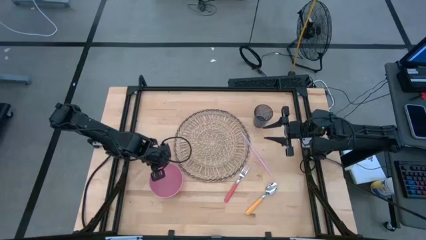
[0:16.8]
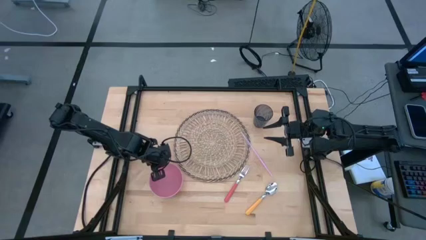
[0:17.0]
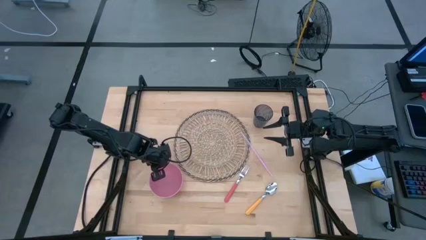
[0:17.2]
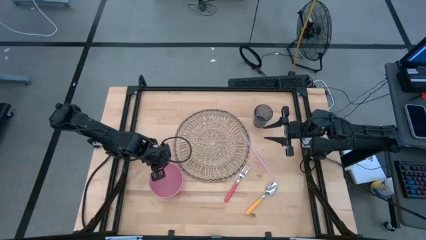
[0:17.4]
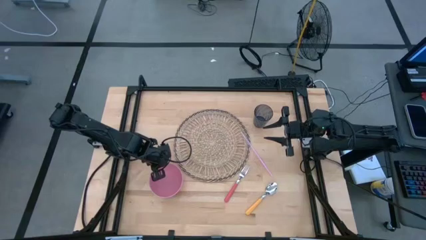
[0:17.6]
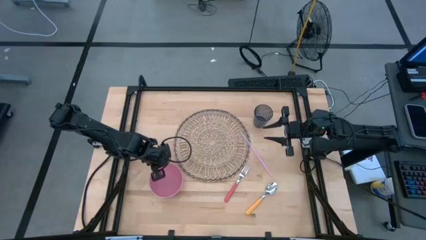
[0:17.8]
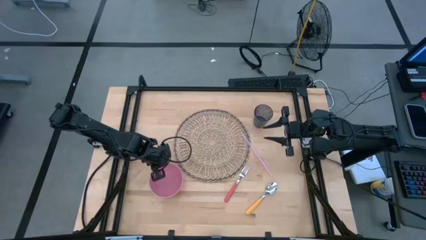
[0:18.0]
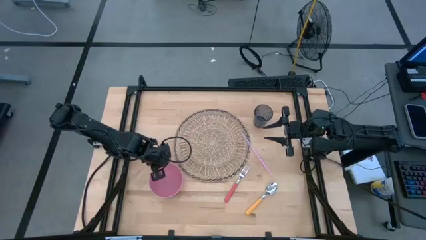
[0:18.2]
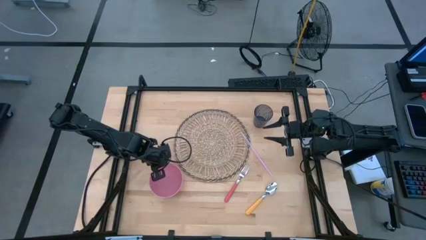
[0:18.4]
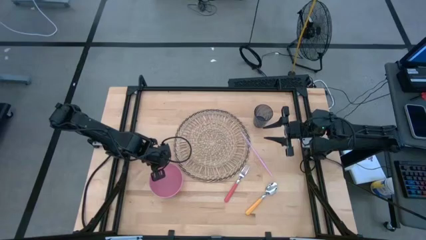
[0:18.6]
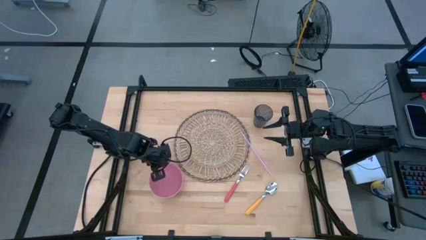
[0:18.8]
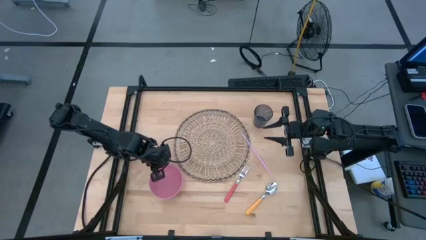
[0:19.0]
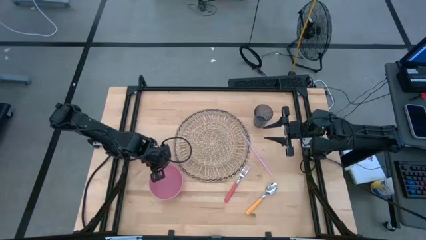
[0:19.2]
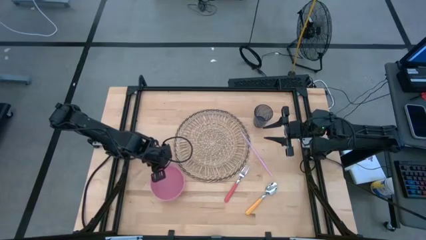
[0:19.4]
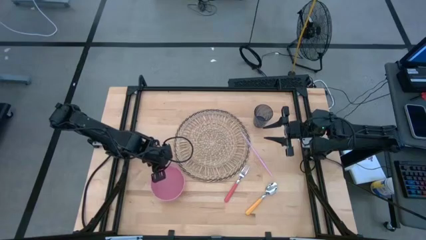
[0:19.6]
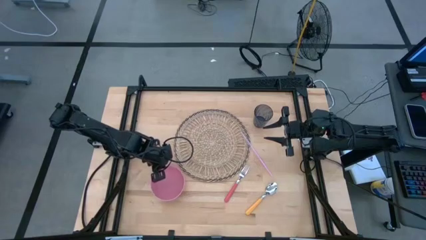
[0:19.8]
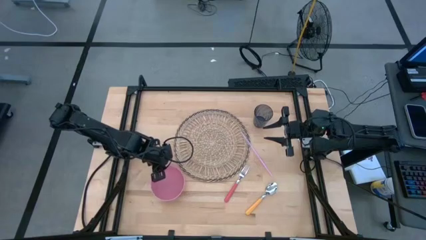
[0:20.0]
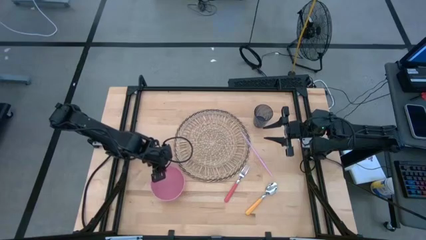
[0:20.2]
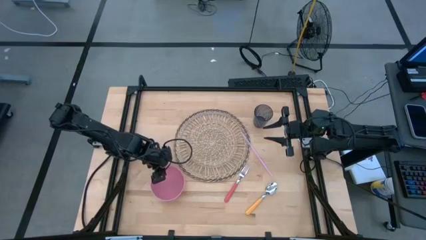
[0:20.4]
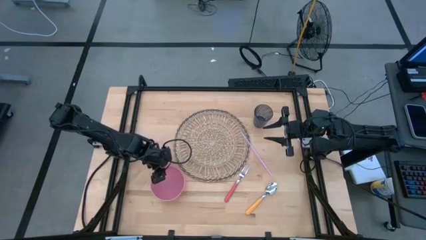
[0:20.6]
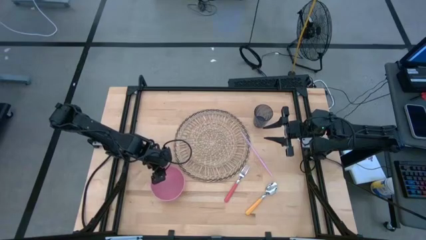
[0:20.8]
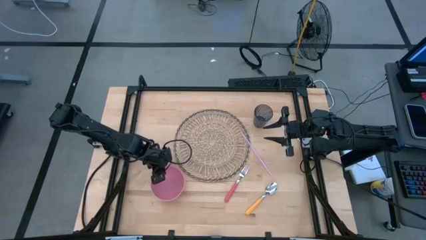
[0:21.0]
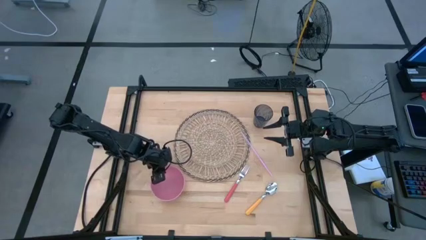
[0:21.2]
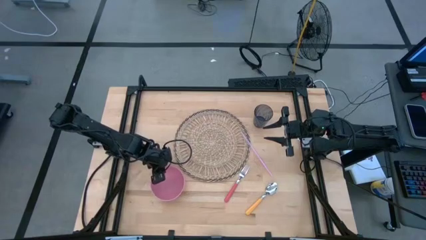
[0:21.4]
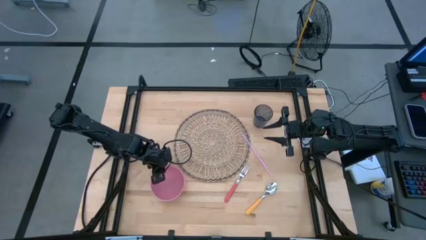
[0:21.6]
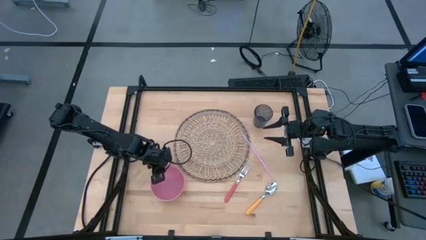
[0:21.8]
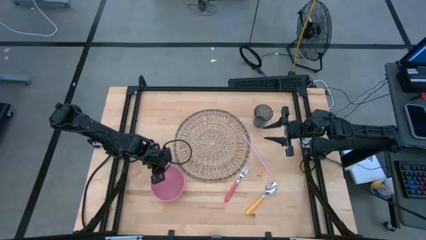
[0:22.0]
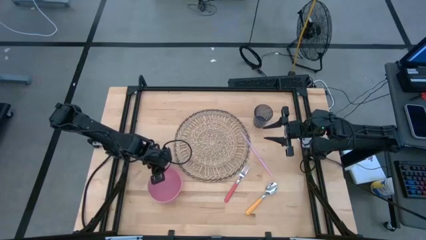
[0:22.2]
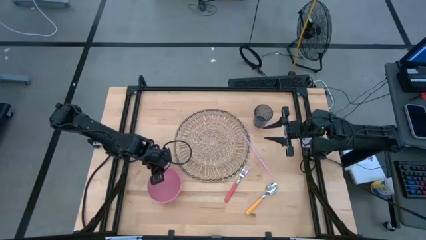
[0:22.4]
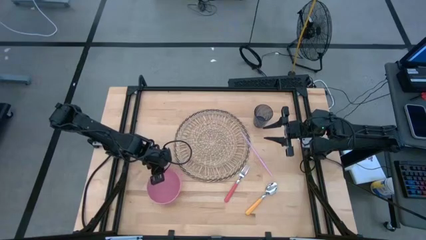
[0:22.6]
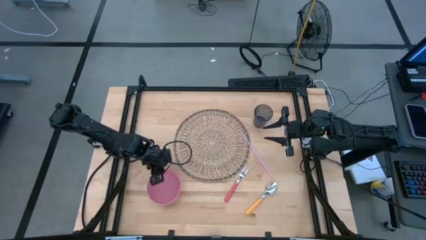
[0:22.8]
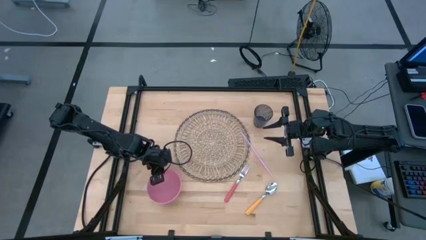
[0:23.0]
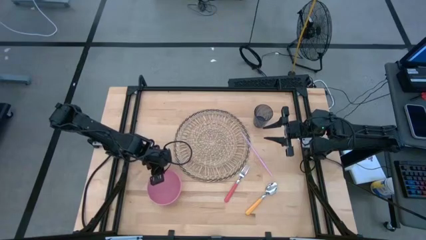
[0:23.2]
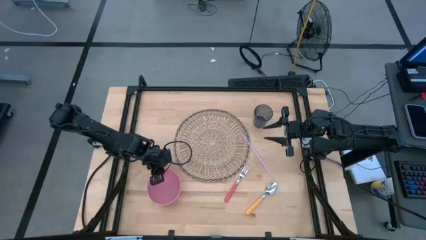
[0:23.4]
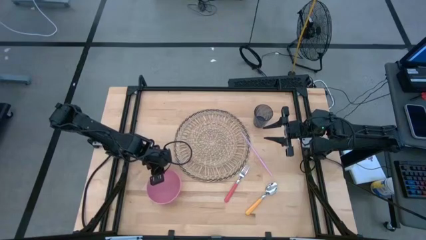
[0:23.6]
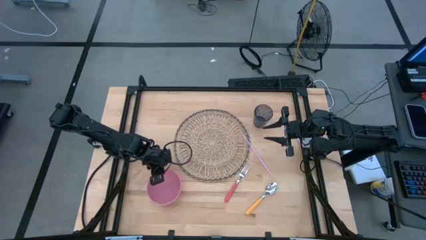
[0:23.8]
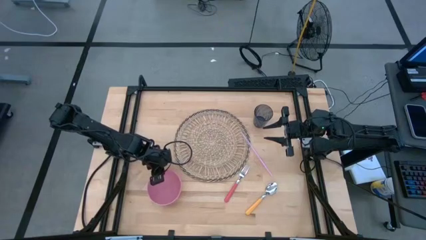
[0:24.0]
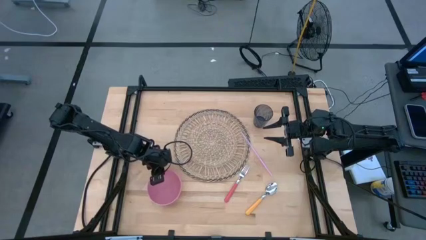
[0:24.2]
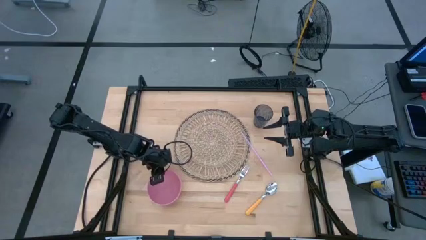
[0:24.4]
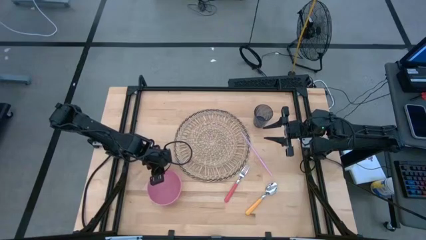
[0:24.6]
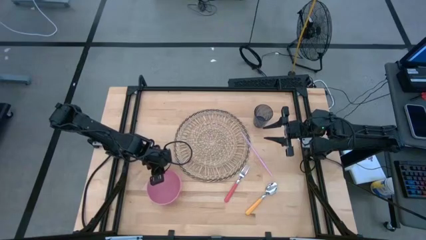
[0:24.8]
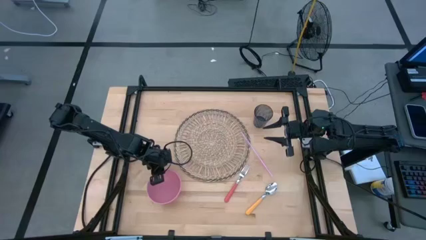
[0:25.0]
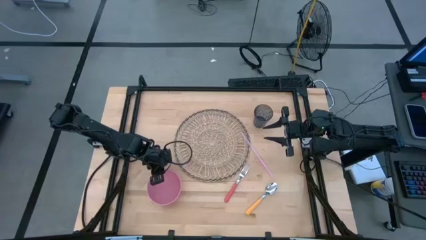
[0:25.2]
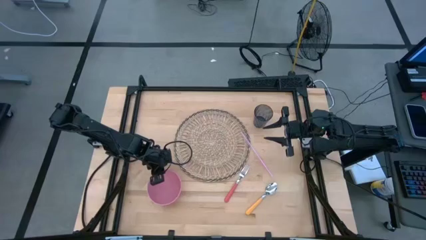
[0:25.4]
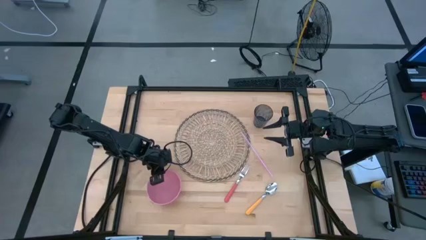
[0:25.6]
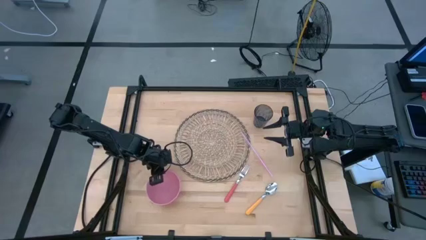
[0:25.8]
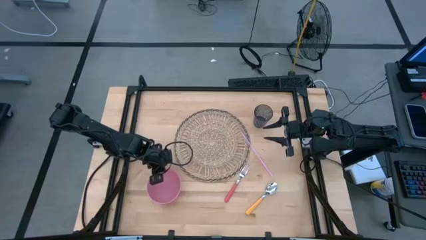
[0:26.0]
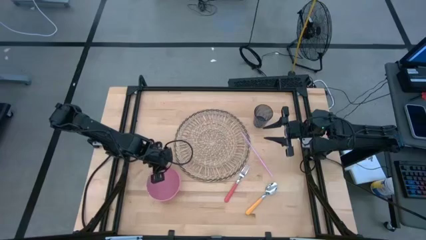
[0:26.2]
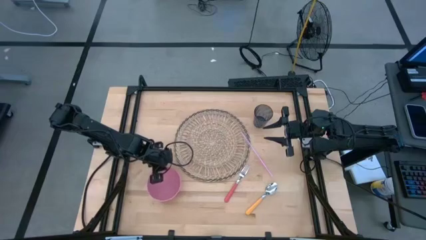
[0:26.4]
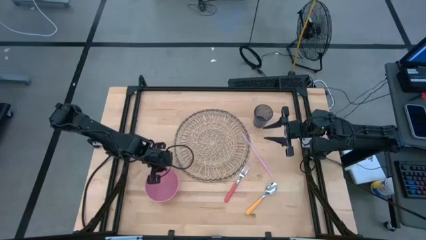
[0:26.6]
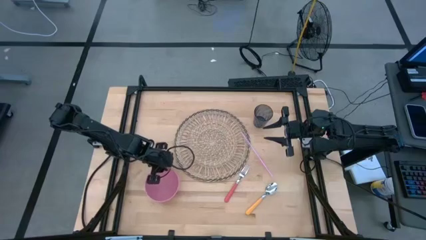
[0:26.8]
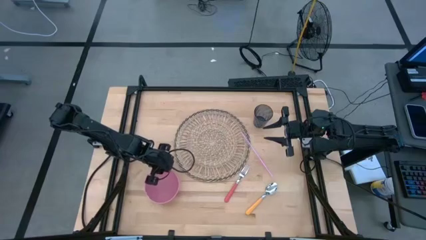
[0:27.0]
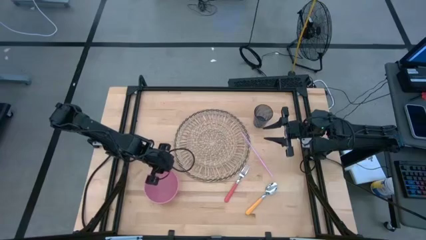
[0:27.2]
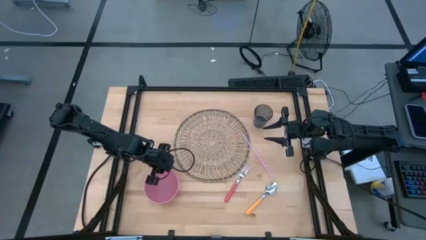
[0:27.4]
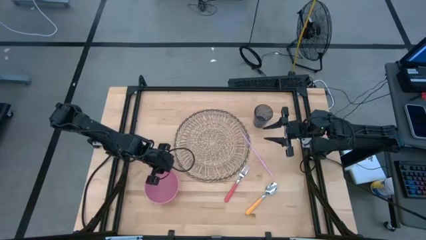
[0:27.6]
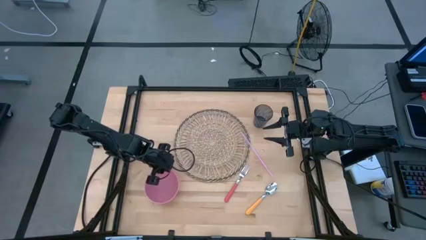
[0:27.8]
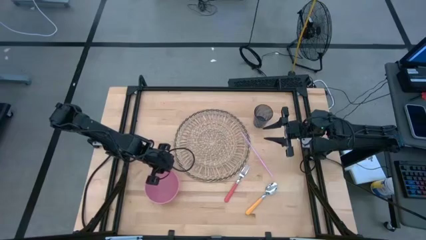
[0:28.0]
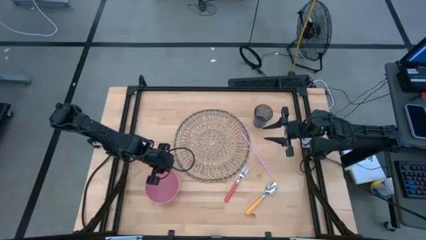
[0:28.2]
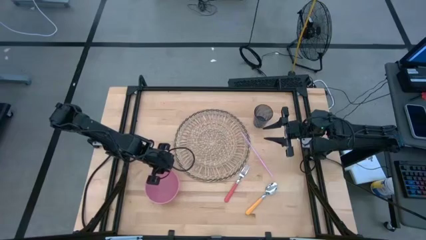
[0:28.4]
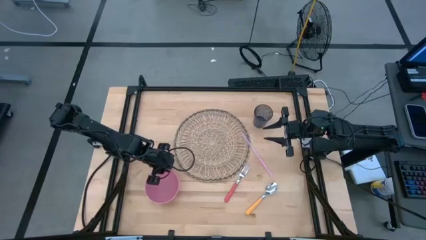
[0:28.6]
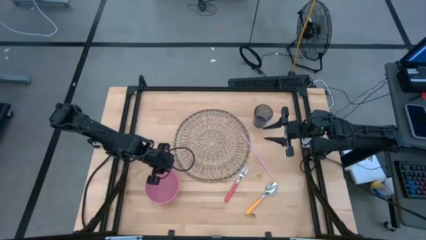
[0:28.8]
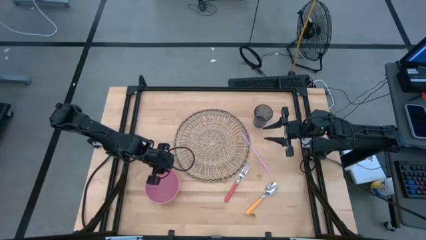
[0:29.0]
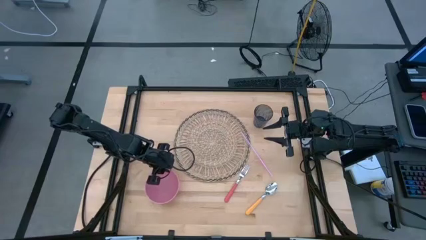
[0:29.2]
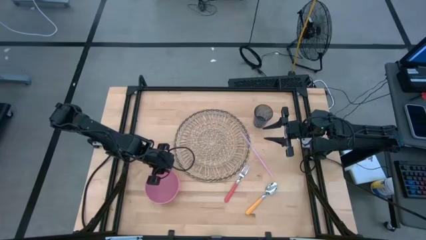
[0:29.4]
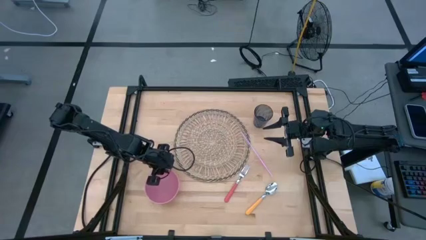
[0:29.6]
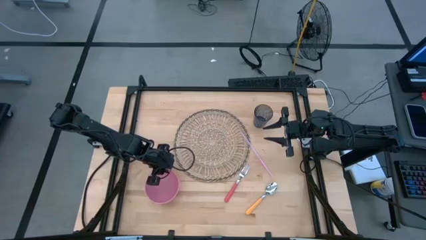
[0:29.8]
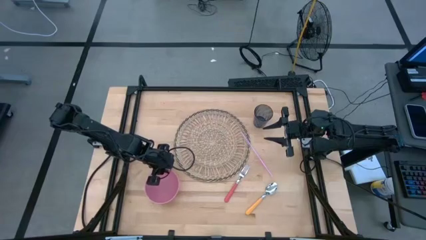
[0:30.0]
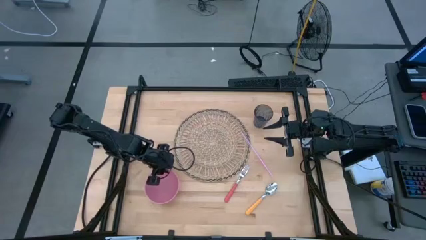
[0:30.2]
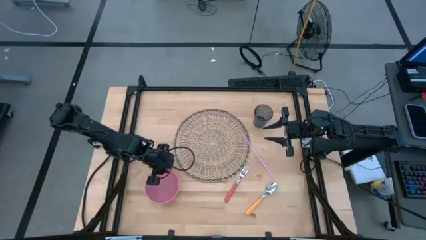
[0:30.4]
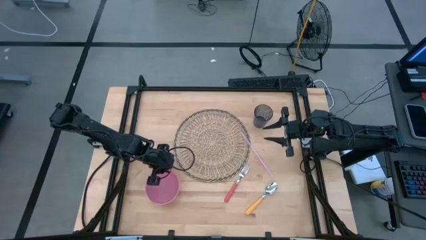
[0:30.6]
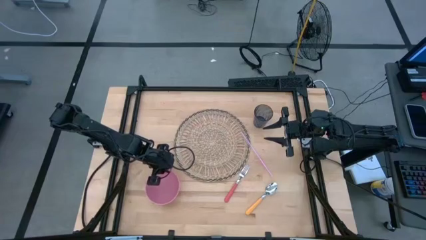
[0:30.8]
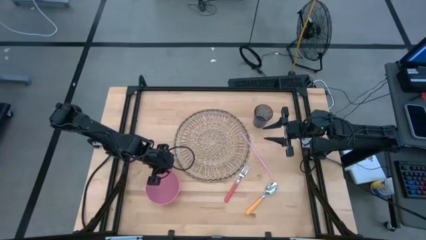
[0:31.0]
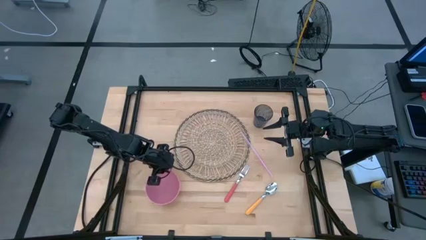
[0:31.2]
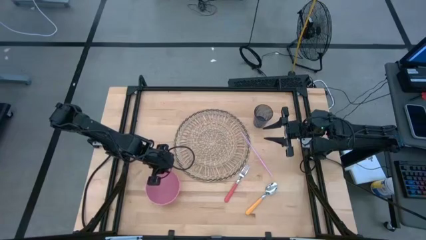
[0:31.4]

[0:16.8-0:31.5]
Task: Pick & Place Utensil
Put the pink bowl on the left side of the brown mat

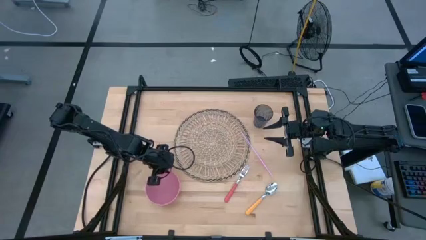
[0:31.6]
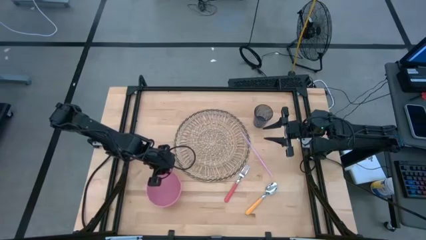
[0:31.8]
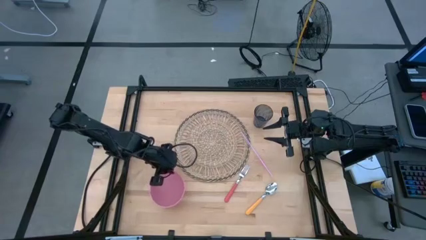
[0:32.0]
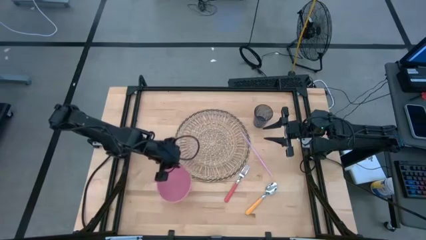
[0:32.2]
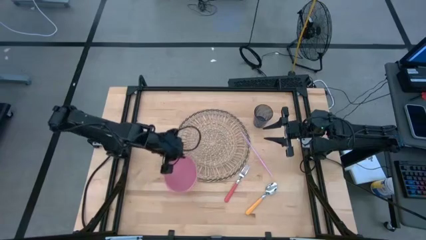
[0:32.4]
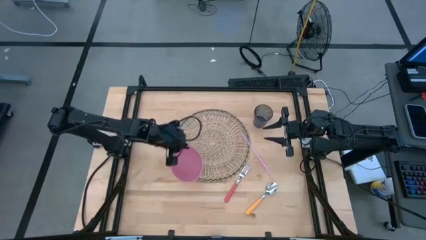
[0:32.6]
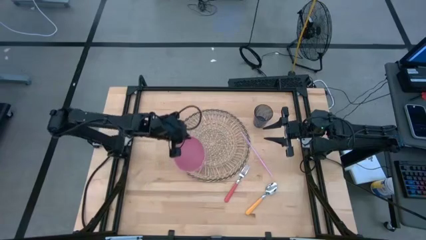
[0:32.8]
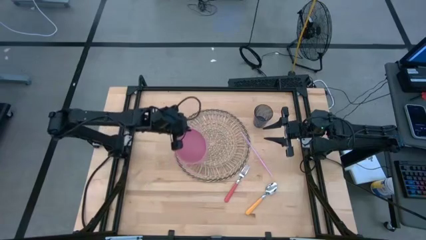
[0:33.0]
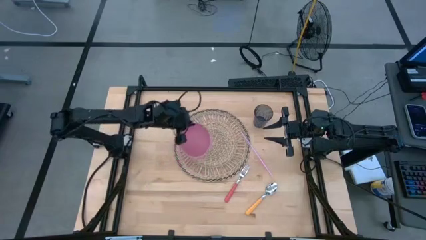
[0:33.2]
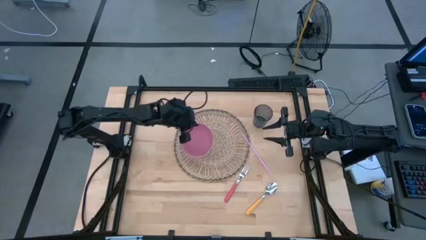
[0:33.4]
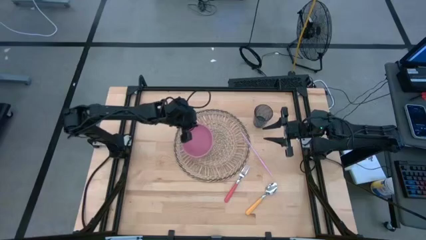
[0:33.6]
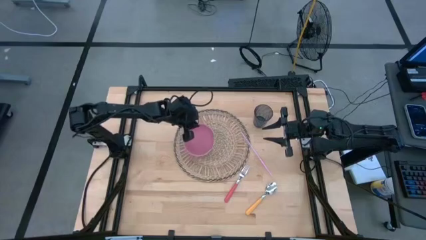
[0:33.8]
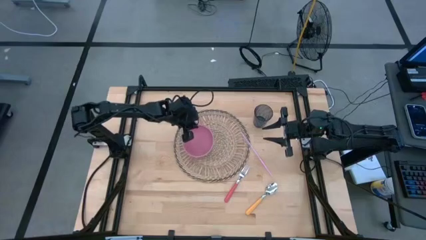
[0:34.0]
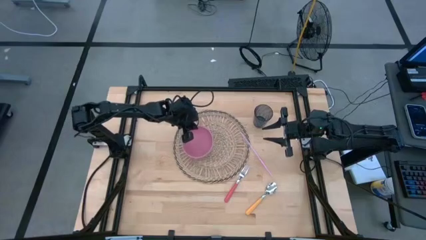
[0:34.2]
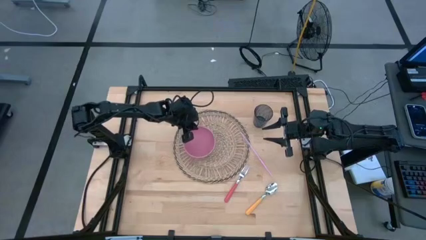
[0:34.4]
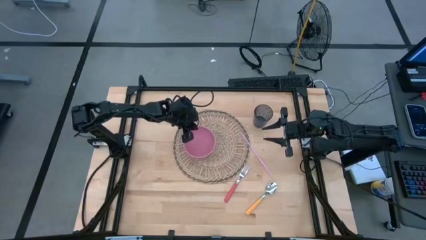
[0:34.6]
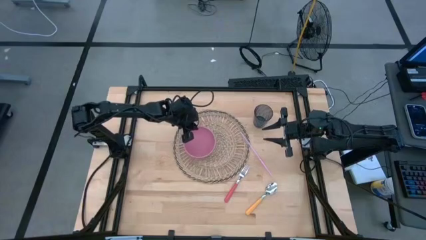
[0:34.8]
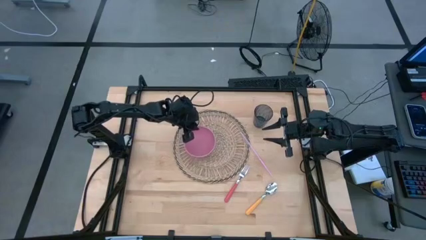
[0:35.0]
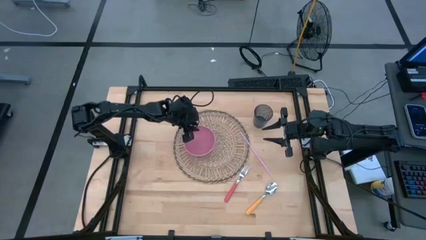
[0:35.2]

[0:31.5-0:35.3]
Put the pink bowl on the left side of the brown mat
